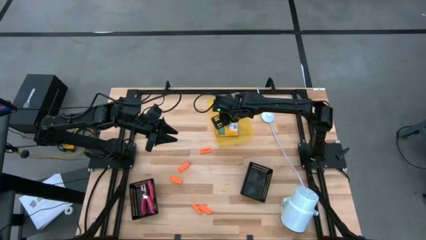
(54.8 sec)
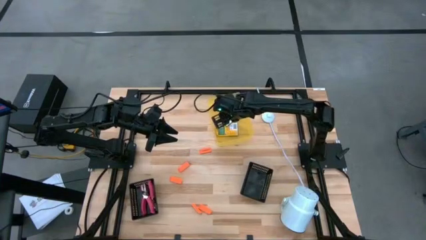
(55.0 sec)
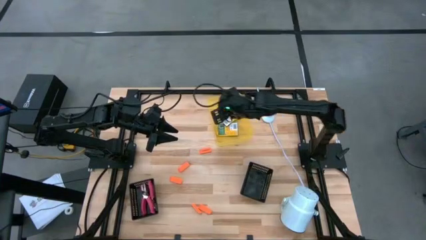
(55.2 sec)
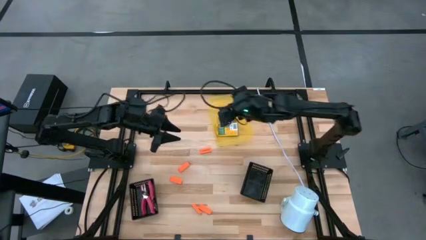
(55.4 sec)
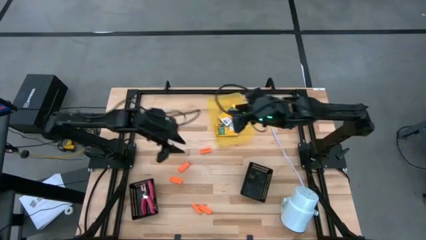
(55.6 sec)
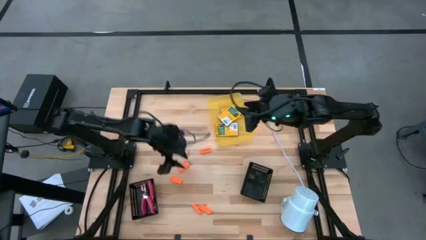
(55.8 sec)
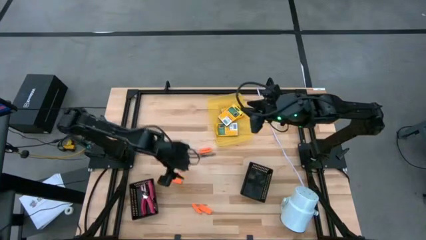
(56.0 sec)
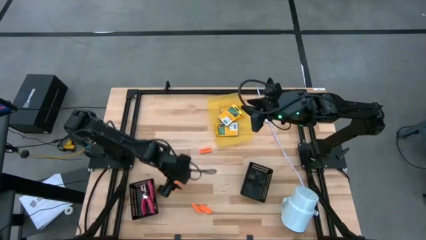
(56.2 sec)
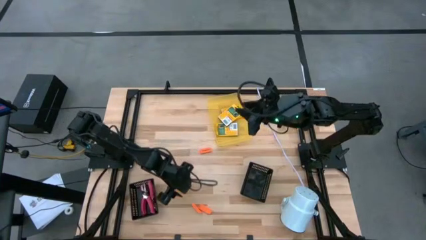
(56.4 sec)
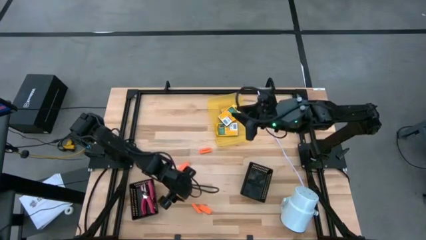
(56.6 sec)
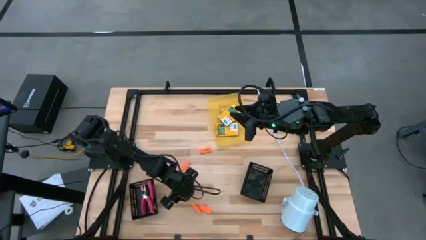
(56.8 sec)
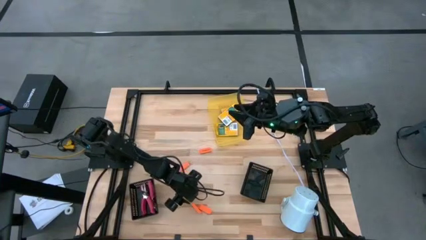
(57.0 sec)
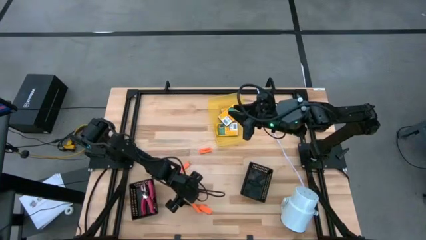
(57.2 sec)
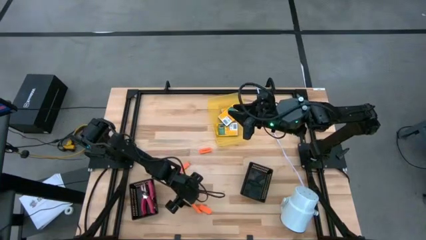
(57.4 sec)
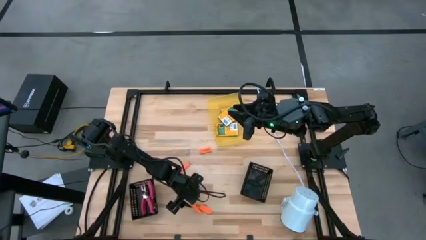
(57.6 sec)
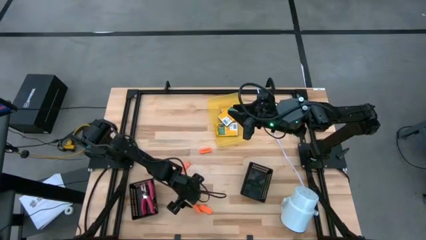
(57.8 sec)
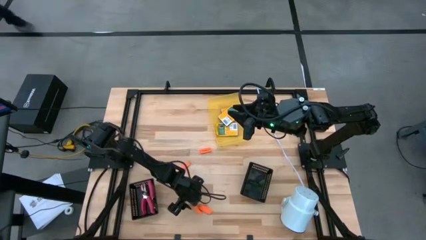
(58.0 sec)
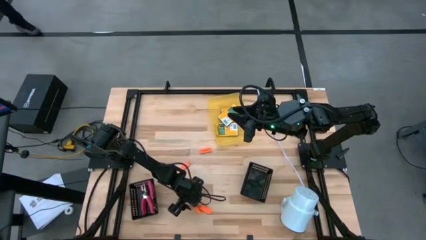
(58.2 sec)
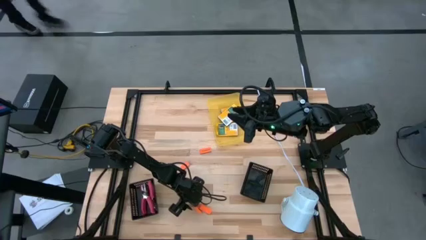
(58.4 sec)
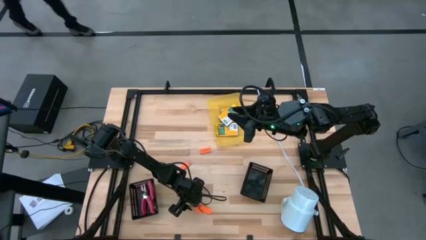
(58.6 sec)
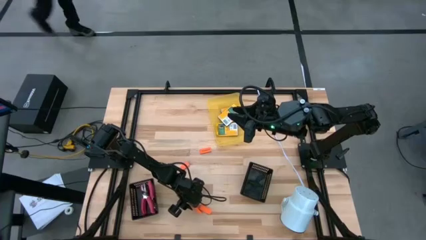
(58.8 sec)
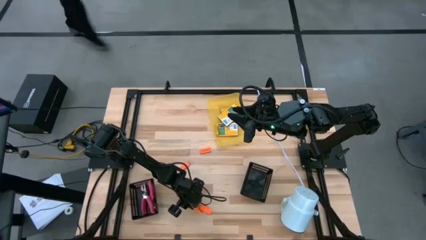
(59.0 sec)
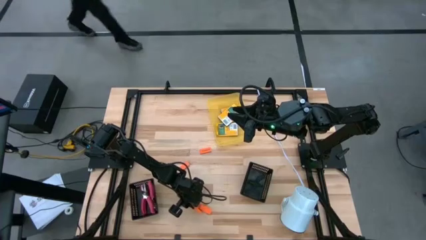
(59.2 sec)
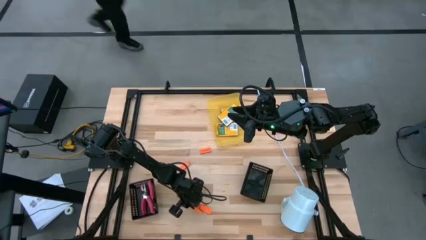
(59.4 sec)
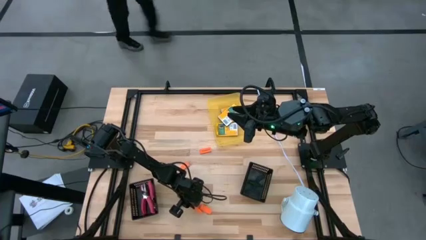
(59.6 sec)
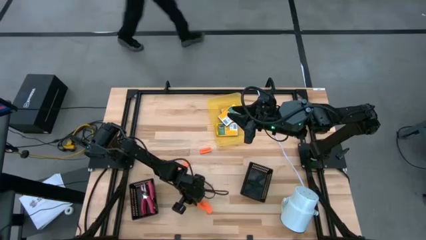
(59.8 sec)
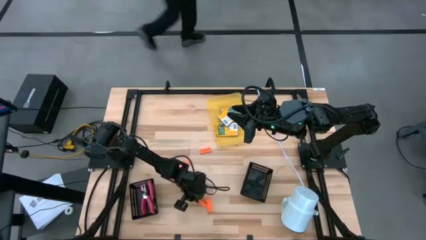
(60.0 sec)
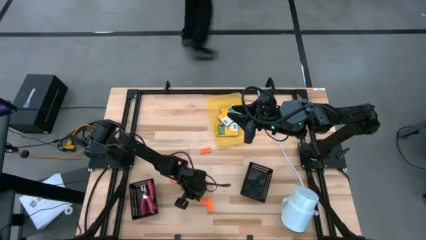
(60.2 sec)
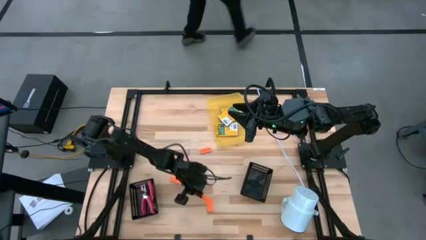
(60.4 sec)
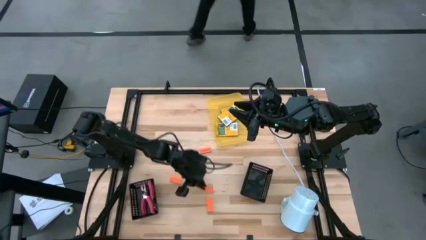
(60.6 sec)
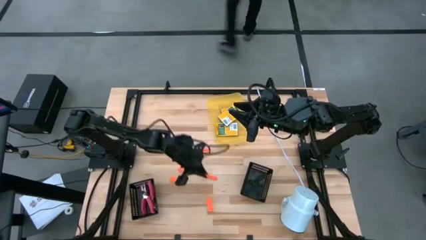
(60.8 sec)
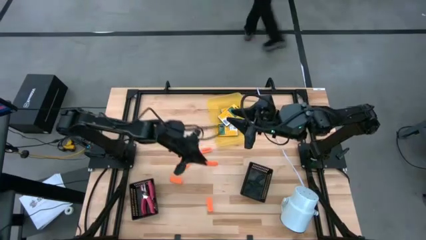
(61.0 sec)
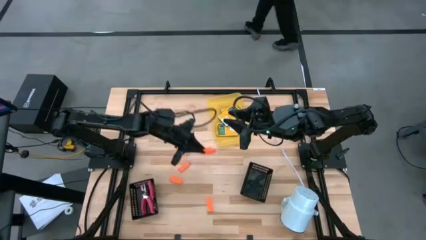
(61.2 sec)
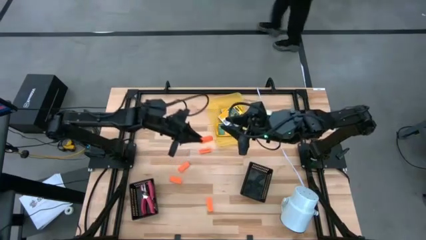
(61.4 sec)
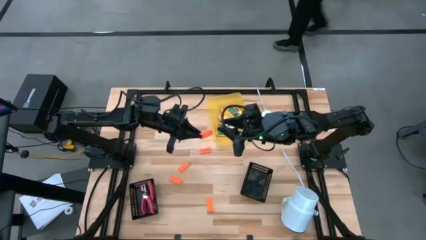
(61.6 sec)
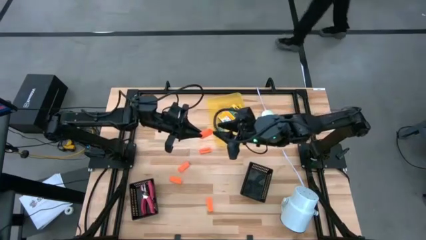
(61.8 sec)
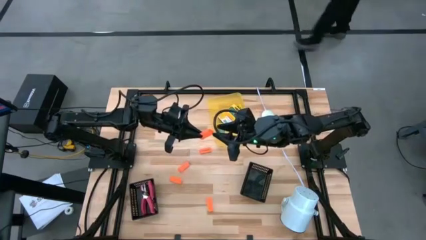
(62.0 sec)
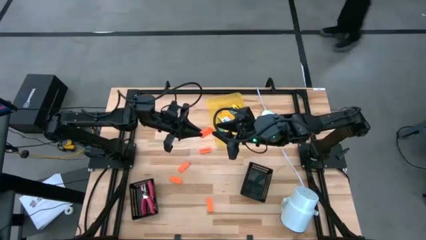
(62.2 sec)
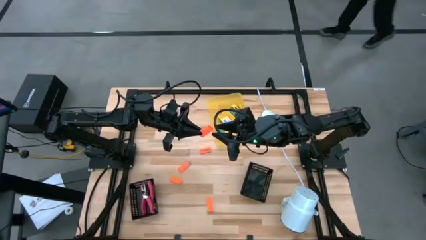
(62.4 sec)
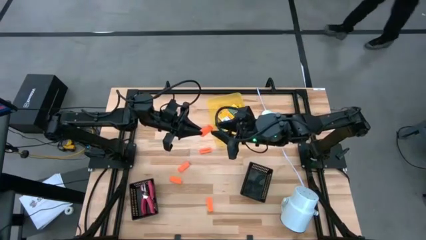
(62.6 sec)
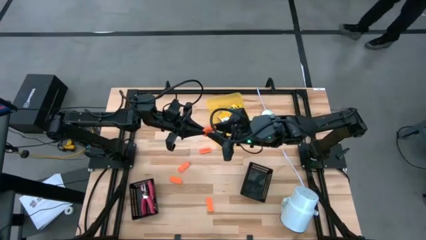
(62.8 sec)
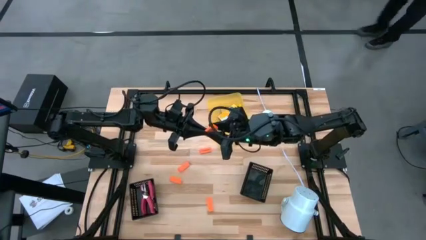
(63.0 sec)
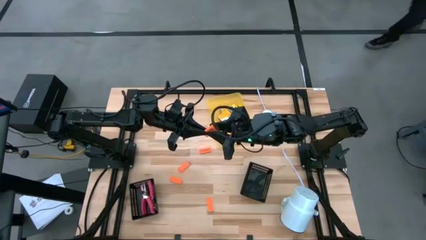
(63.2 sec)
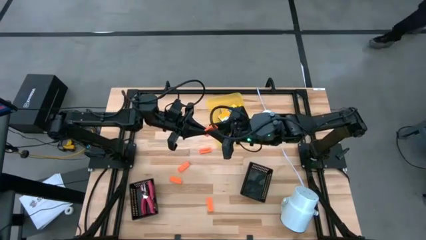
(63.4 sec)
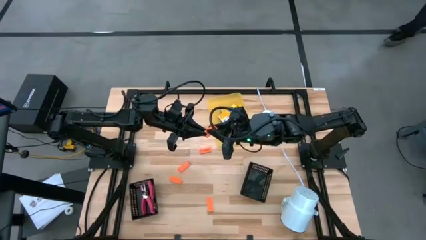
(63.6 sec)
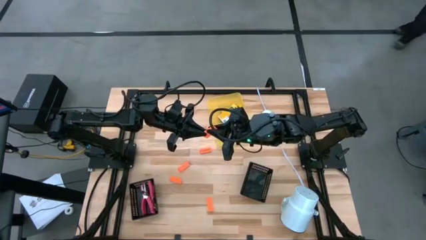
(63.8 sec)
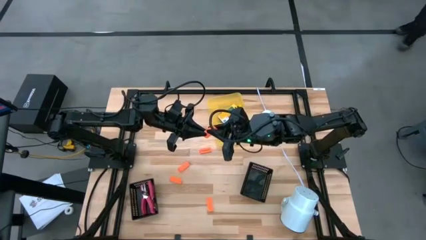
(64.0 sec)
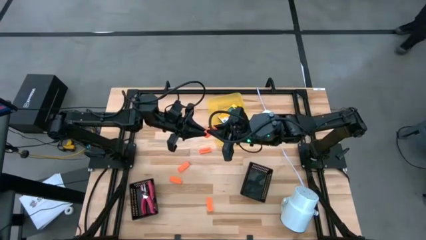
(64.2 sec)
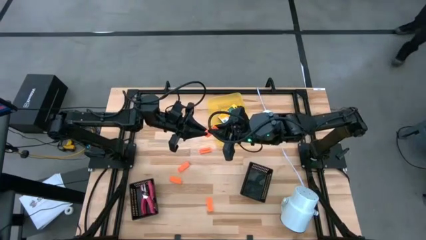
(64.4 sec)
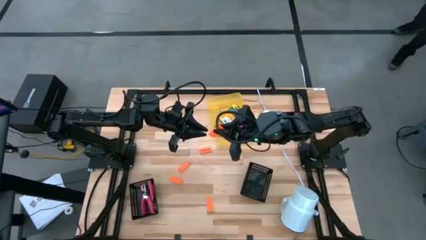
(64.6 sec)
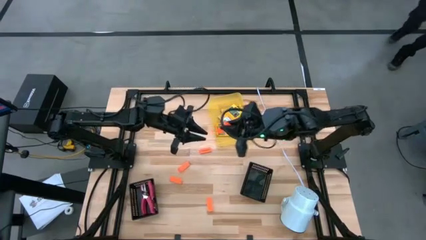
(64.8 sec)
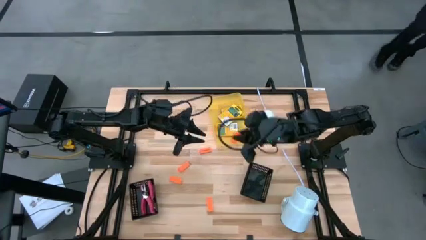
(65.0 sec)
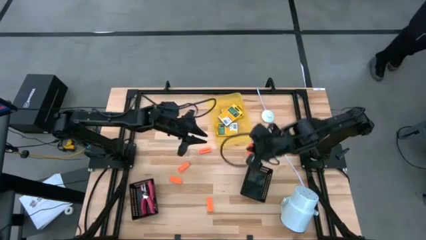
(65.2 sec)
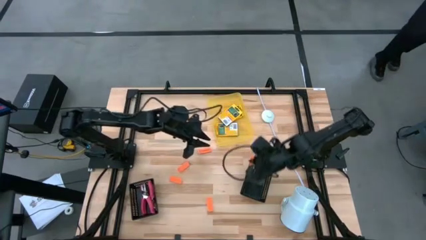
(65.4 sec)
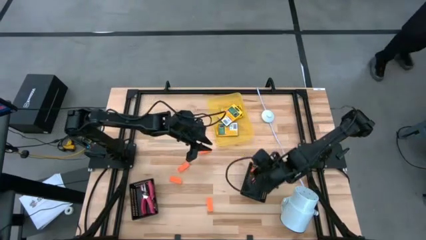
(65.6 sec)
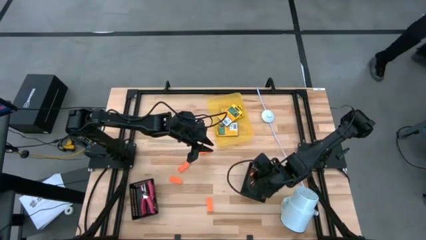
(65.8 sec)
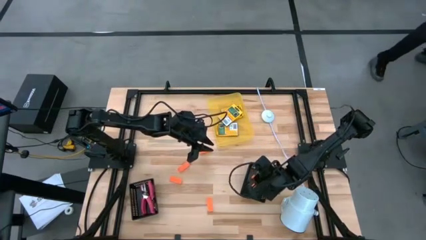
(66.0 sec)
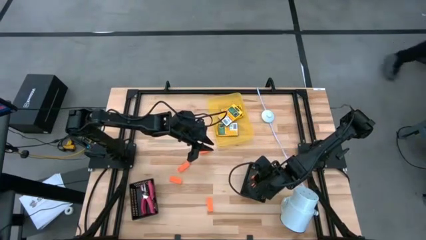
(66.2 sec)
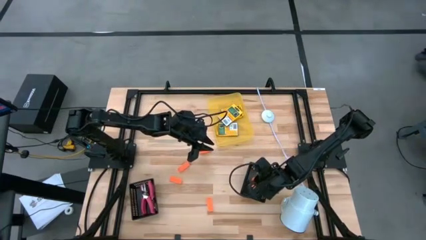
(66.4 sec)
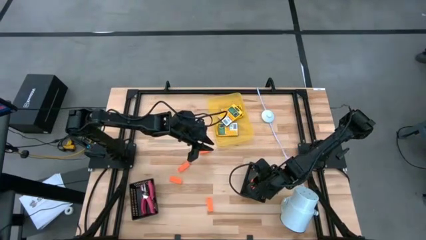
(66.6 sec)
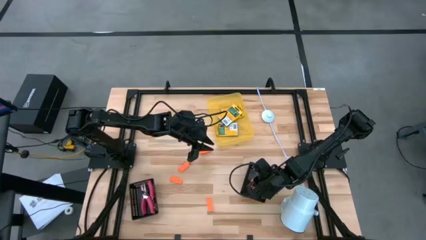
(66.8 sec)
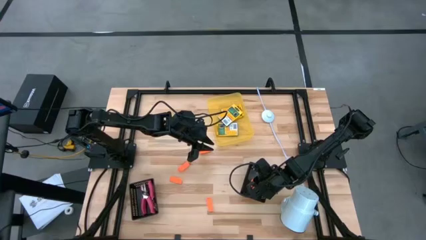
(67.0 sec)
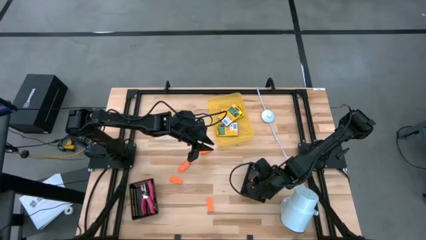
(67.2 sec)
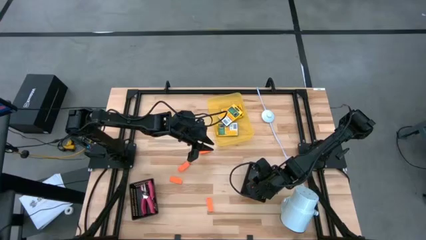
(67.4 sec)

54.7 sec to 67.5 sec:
Task: Pick & Place School Supplies
Put the orange eraser into the right black bin

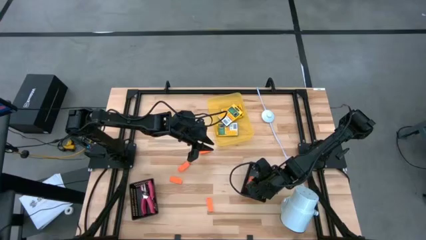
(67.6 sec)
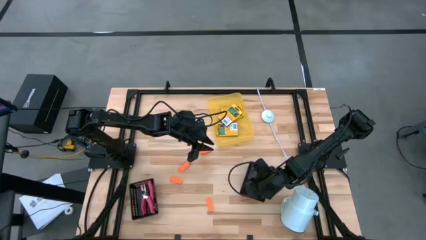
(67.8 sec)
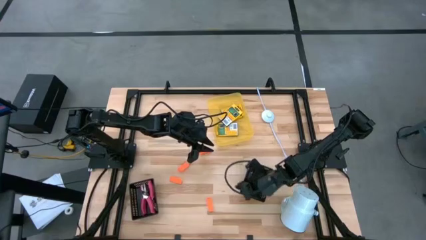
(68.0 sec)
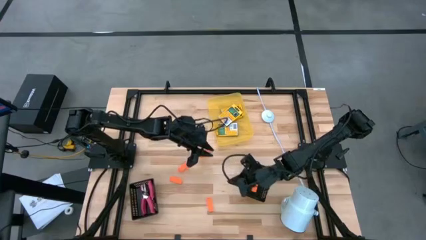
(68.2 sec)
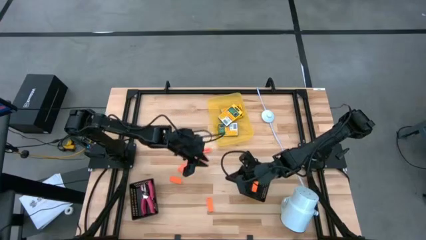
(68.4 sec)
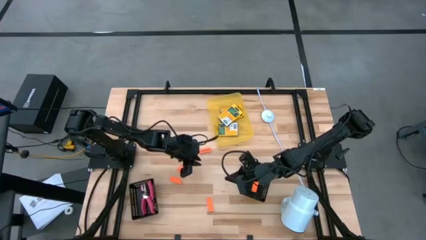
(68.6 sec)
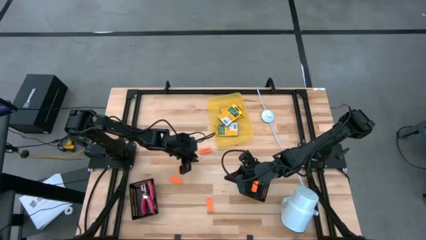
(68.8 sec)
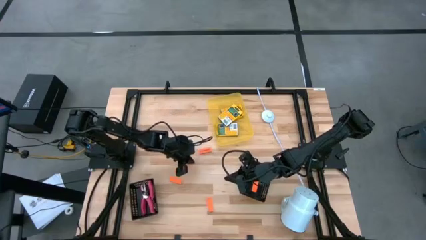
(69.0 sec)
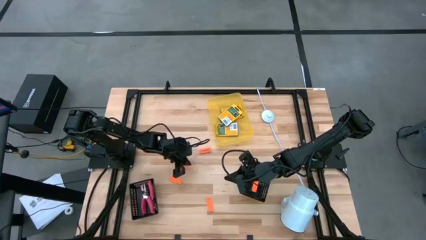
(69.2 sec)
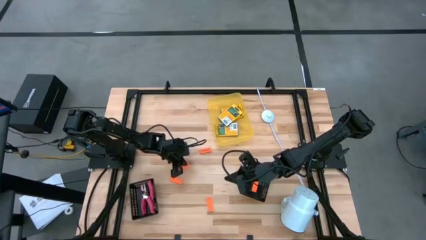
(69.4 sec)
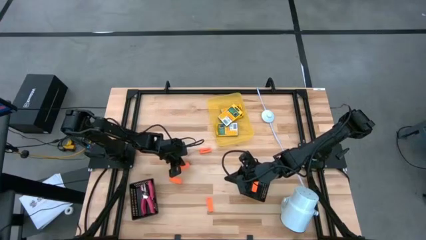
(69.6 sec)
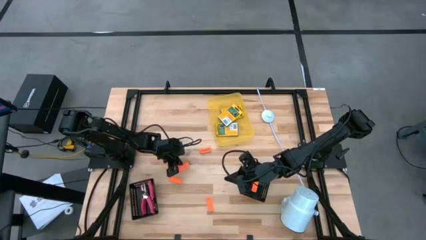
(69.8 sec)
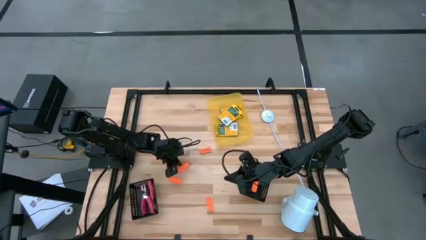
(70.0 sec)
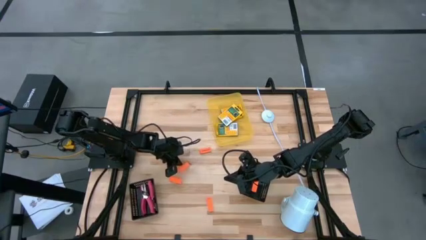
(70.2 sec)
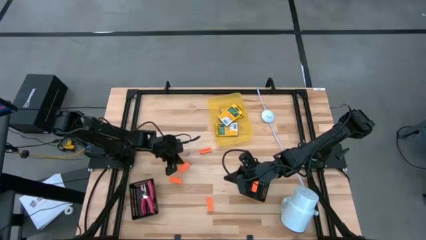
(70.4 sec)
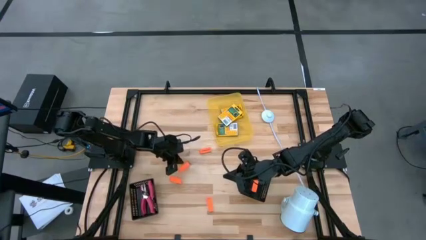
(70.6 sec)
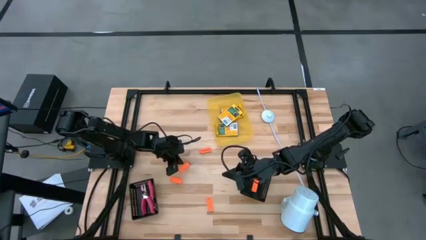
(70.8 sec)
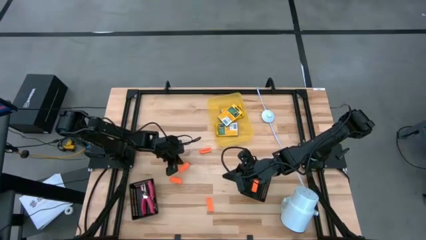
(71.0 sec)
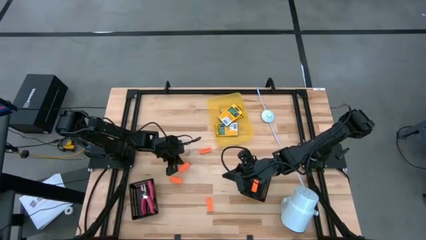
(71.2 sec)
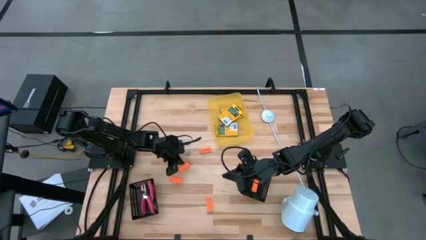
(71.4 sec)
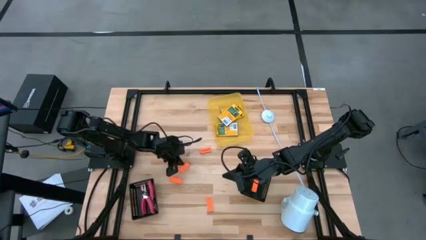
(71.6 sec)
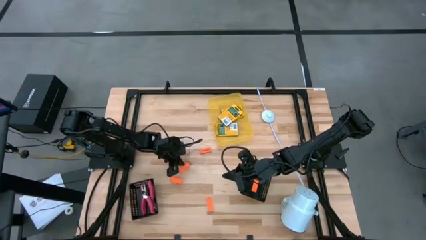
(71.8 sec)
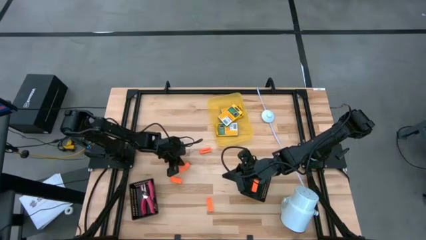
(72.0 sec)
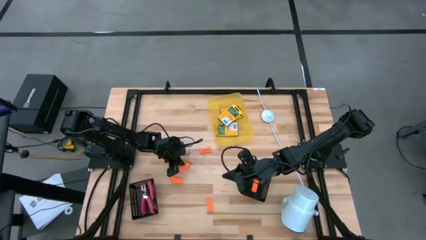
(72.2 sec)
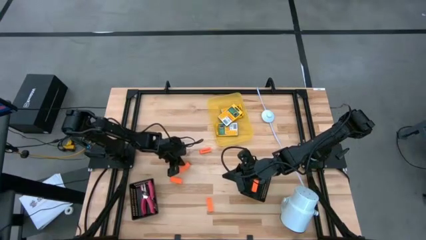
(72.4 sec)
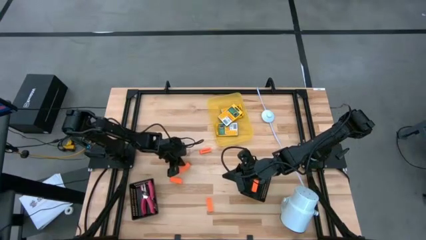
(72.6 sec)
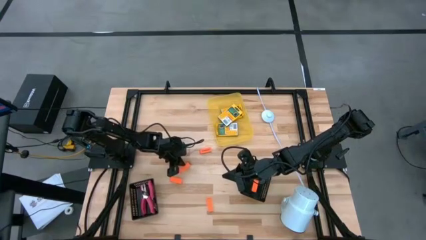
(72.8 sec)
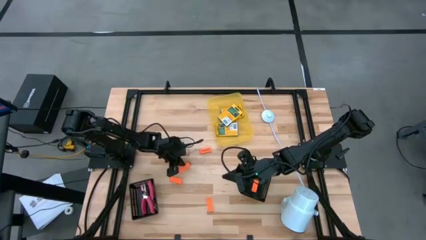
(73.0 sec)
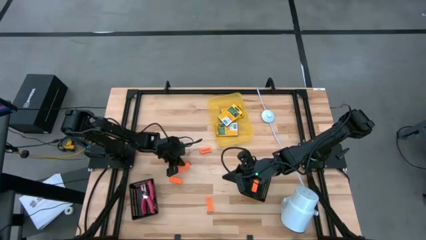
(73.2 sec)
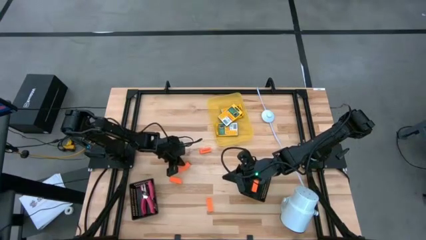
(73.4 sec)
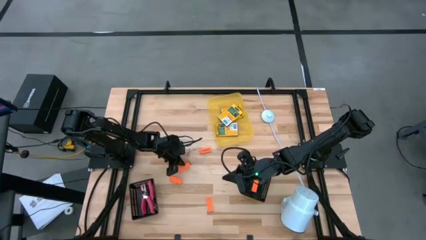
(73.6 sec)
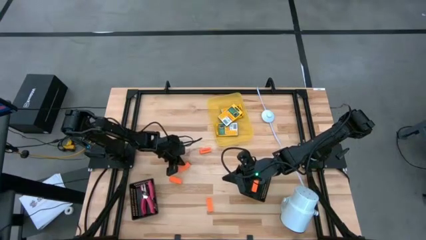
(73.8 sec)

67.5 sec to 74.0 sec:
Put the orange eraser into the right black bin
